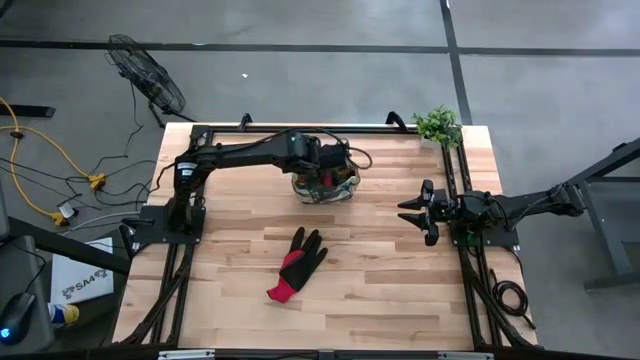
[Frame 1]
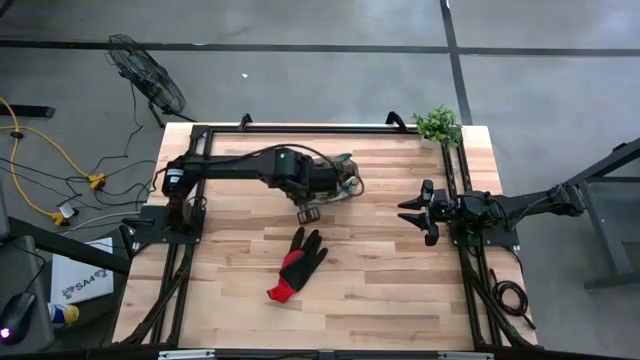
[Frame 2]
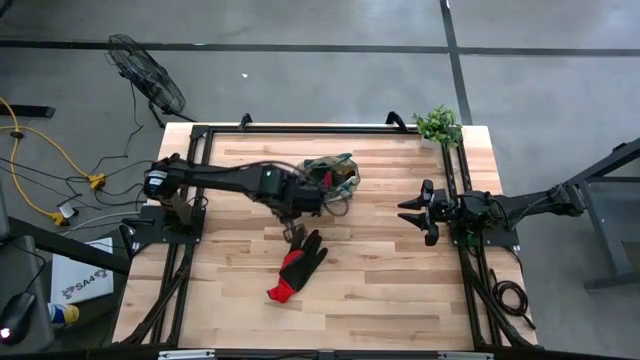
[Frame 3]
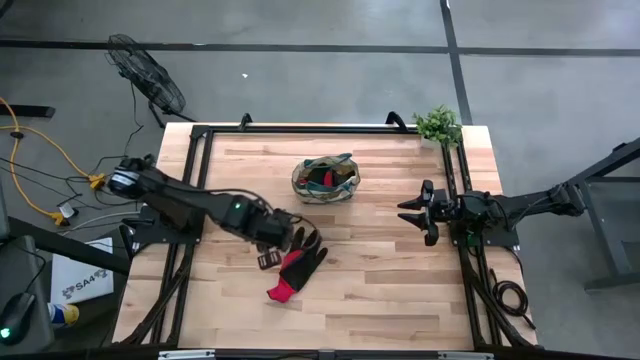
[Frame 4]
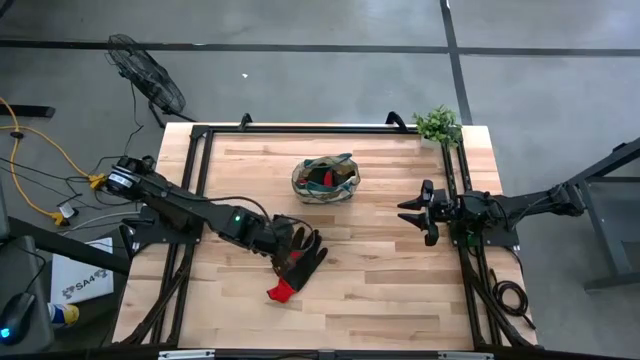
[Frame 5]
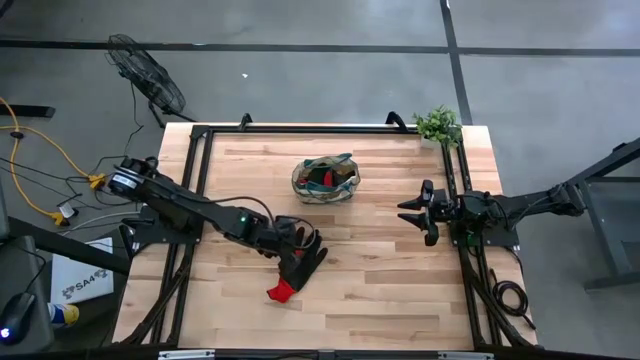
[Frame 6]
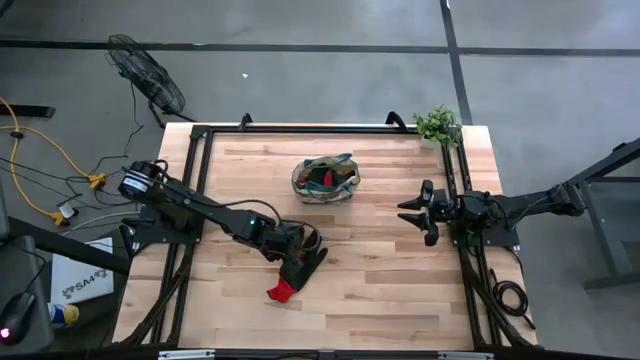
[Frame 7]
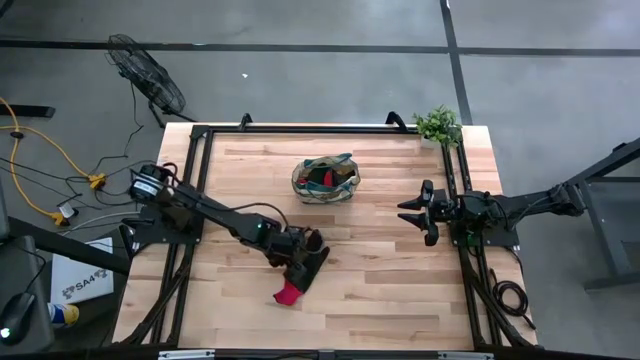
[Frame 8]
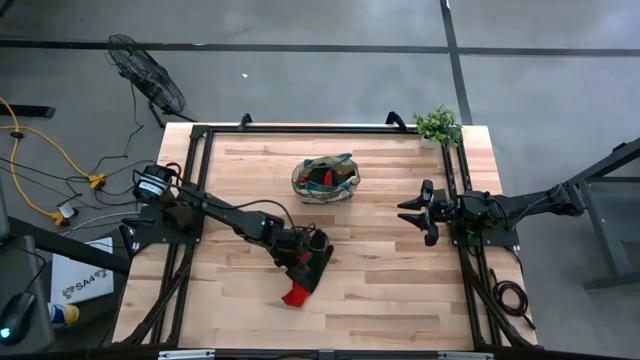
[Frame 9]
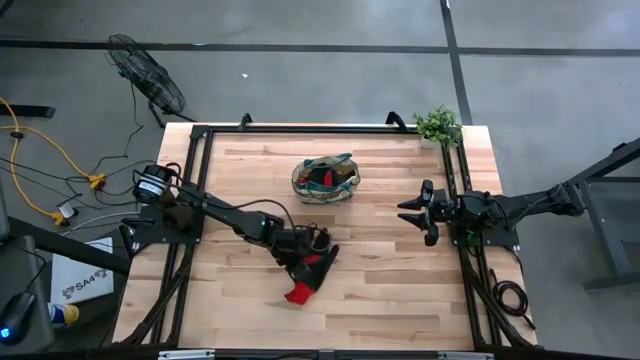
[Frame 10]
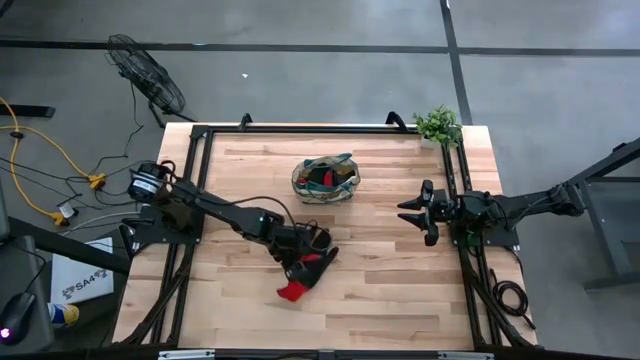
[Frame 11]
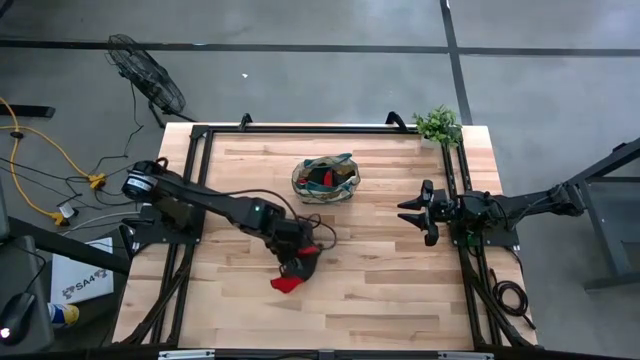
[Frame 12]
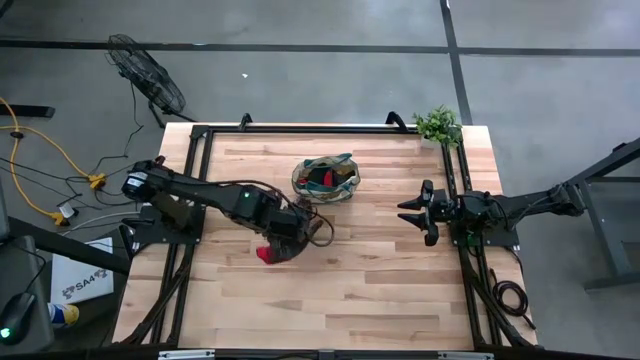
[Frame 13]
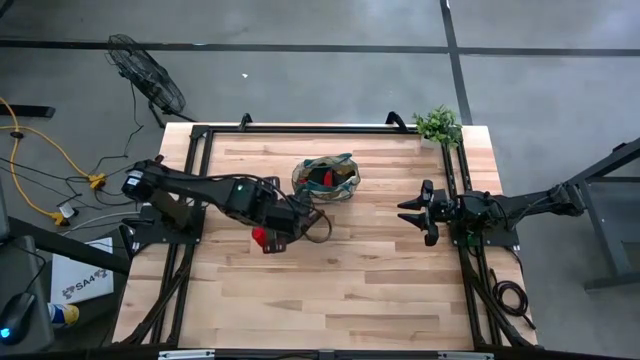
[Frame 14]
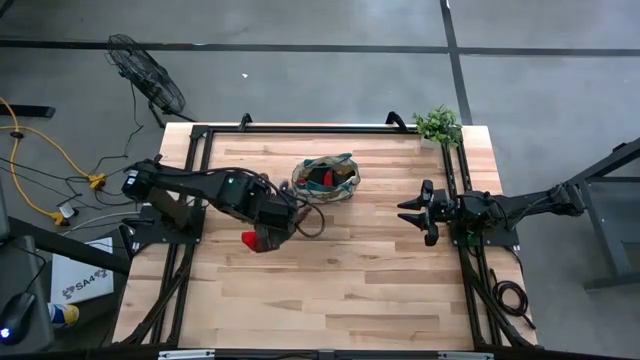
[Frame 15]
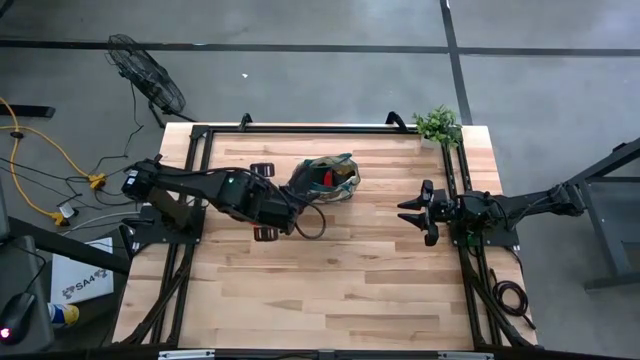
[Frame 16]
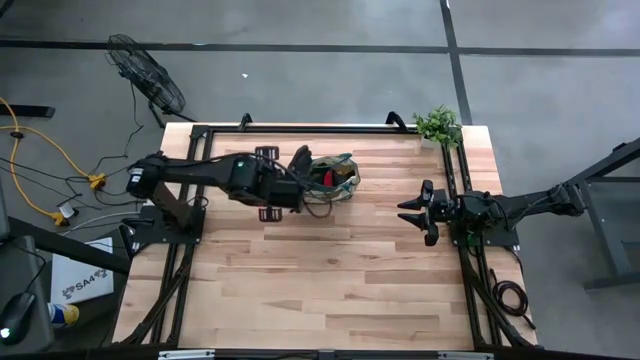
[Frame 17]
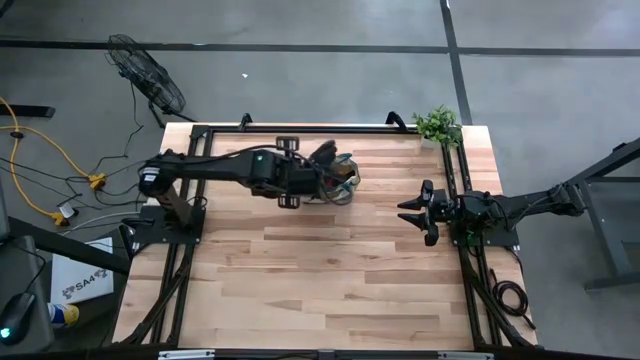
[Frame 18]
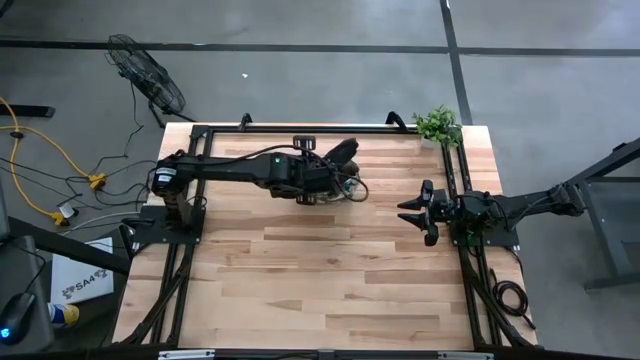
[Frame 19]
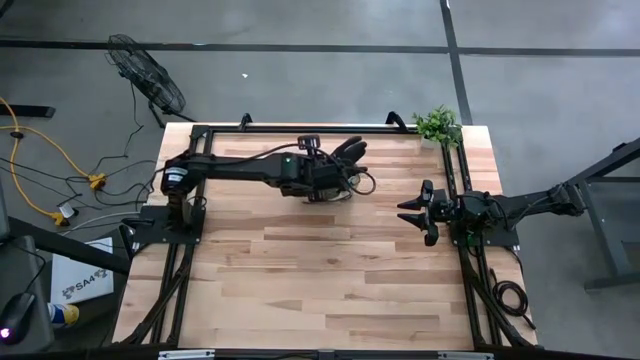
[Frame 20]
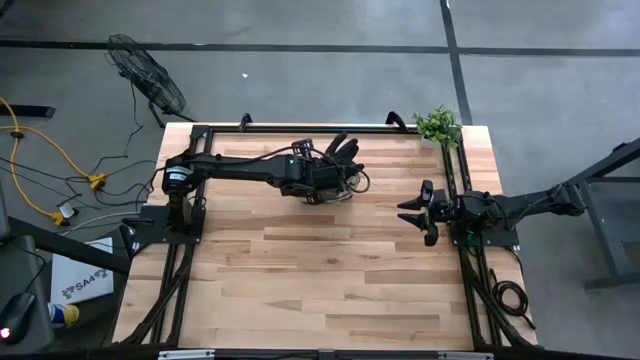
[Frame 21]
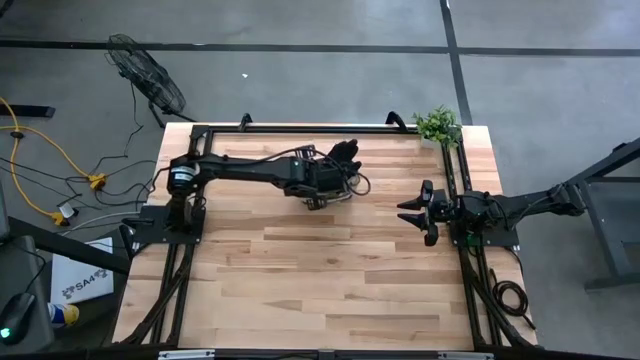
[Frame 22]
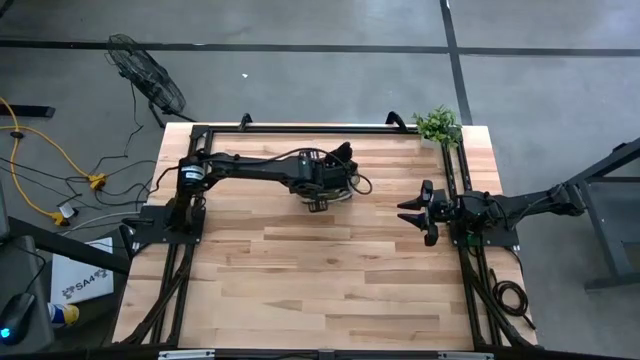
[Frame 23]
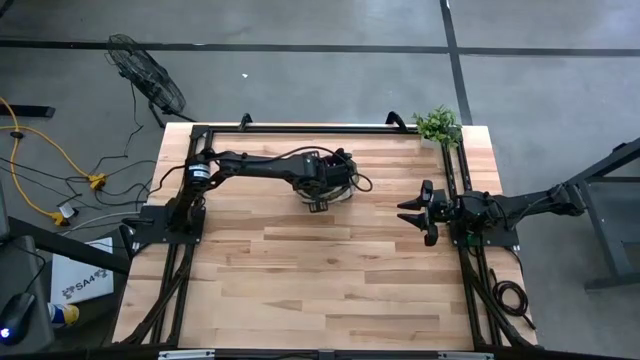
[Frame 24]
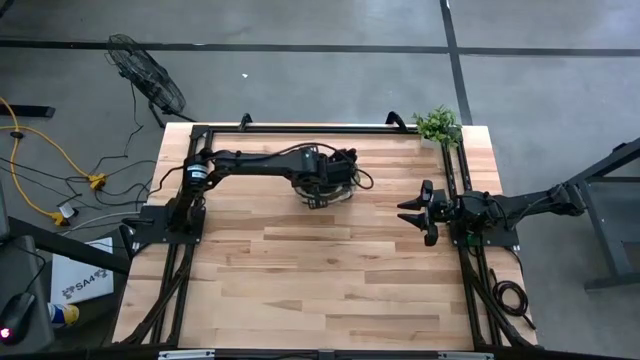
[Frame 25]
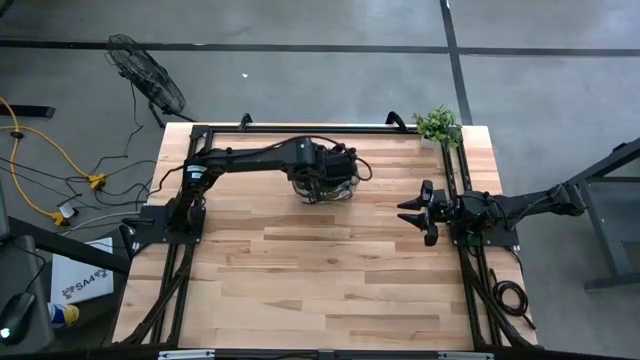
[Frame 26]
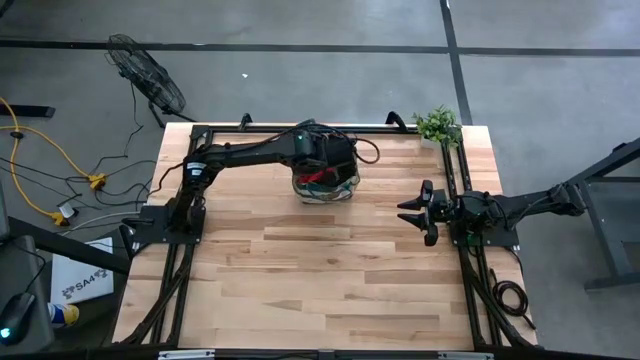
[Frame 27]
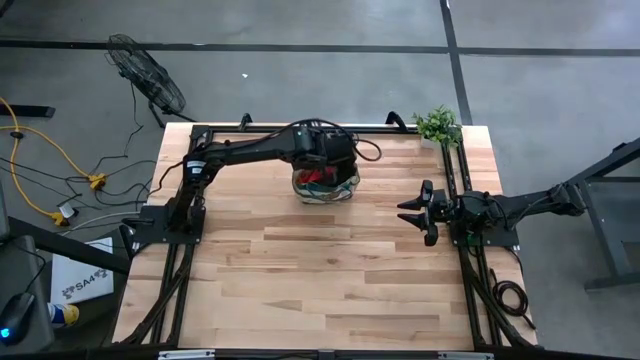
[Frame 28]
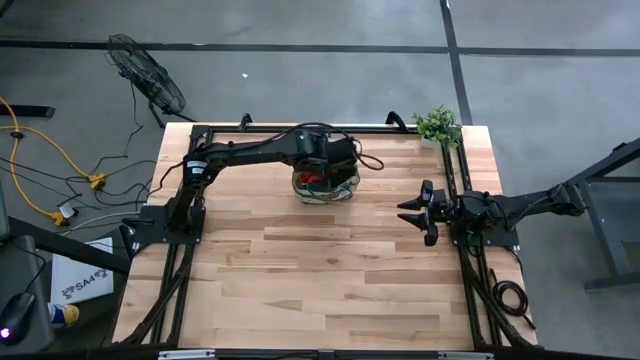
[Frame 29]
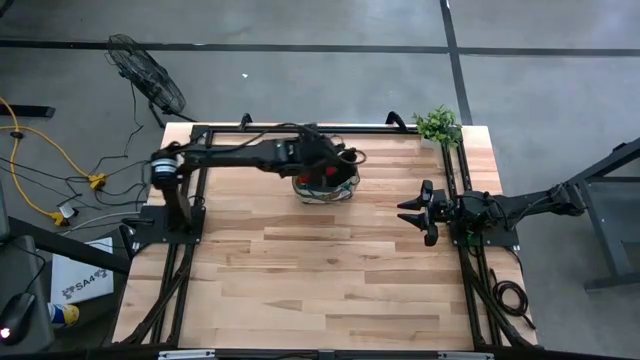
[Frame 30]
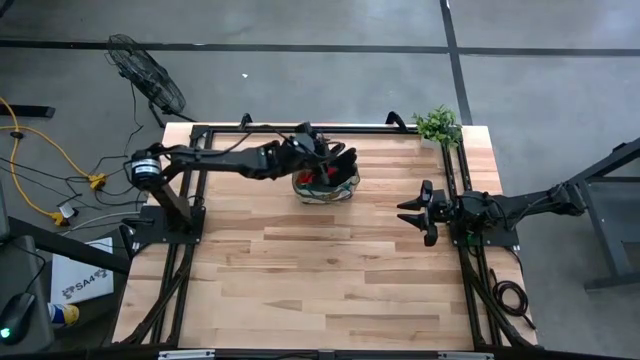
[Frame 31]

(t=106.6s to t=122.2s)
Task: Pick & Place Garden tools in Gardening bag
Put the red glove into the gardening bag

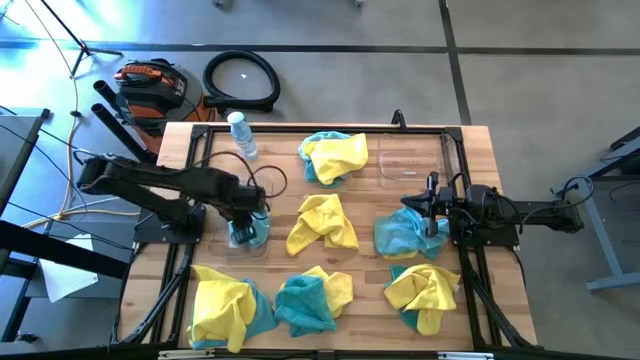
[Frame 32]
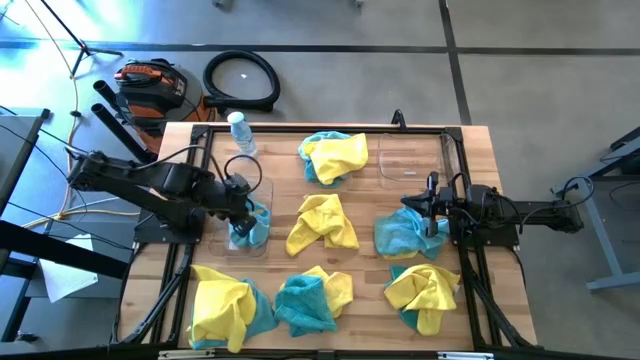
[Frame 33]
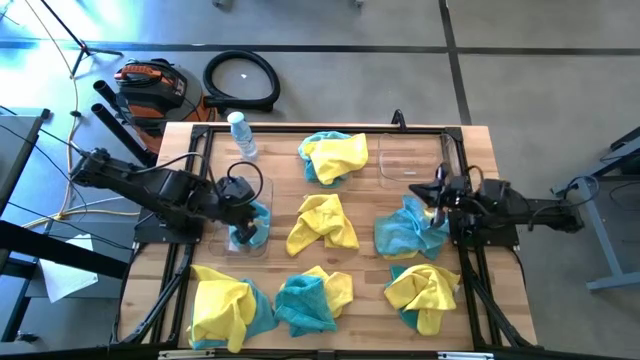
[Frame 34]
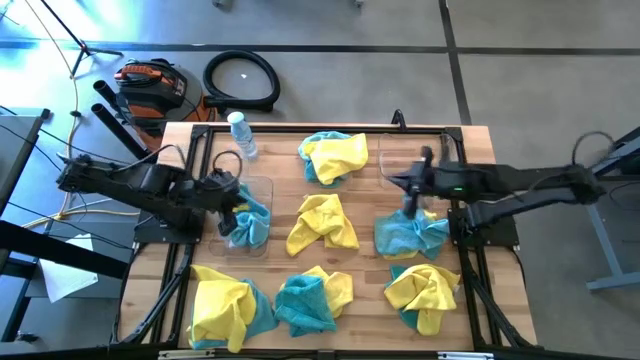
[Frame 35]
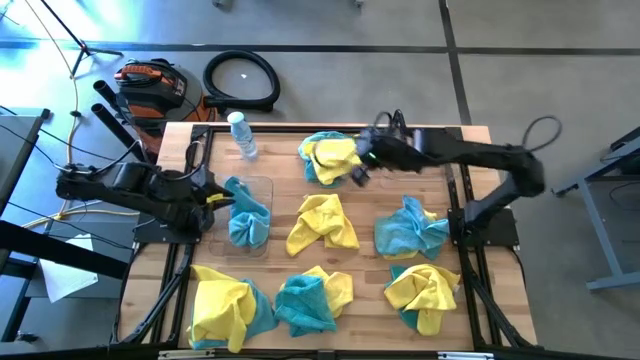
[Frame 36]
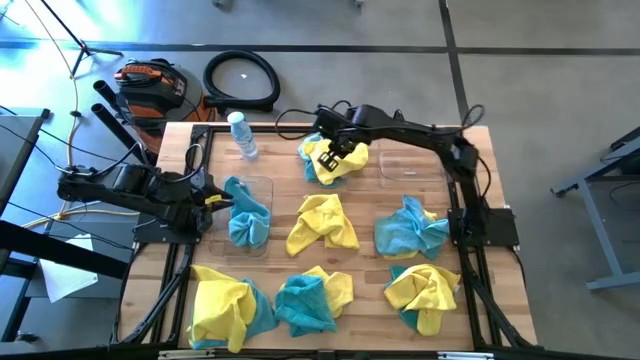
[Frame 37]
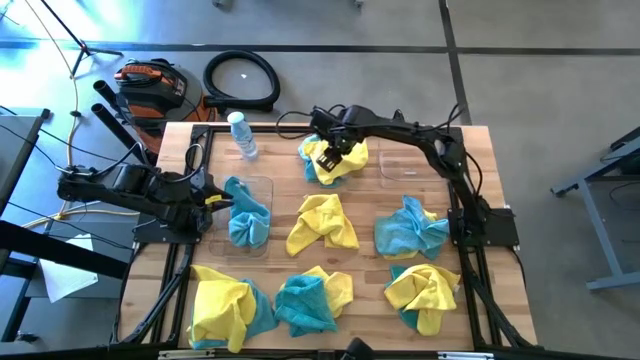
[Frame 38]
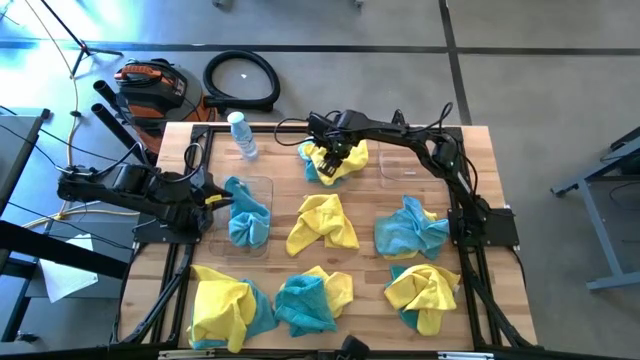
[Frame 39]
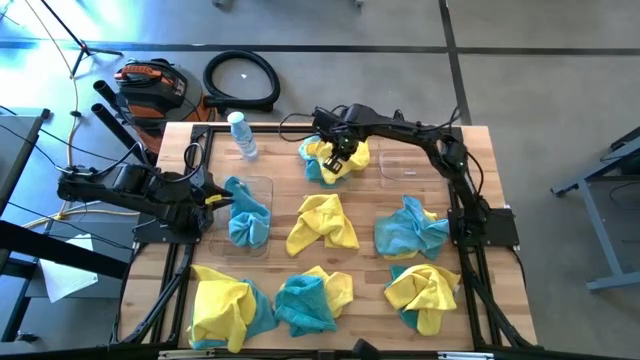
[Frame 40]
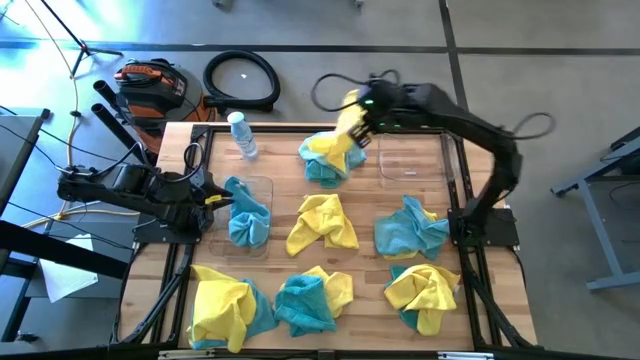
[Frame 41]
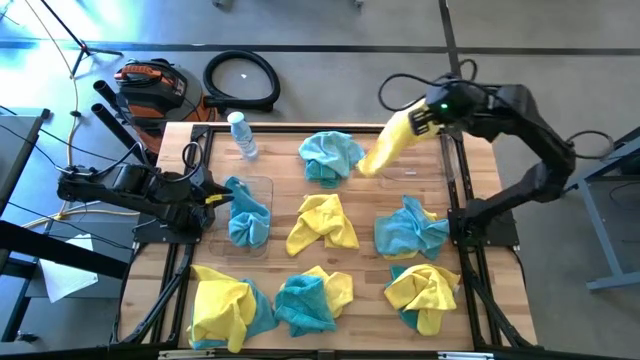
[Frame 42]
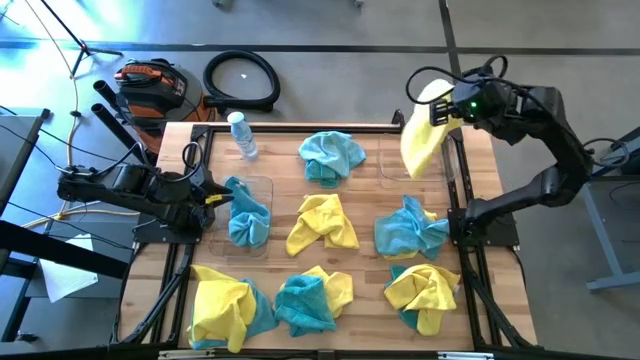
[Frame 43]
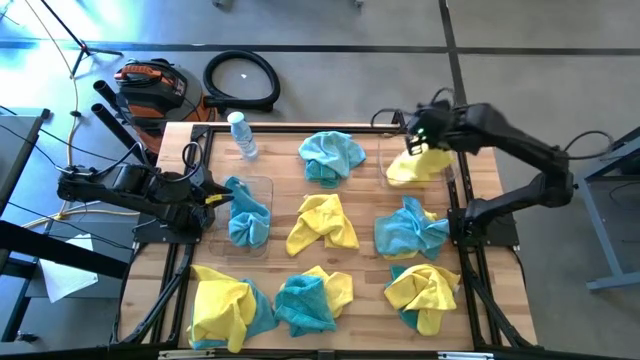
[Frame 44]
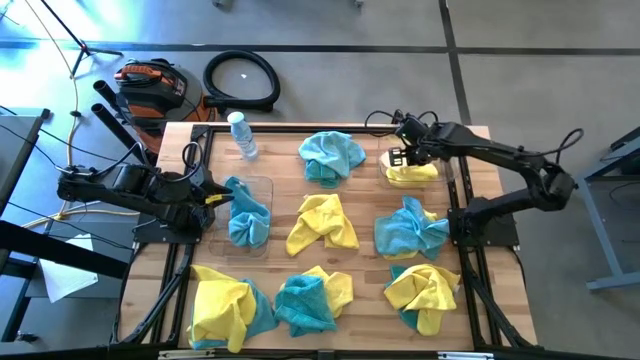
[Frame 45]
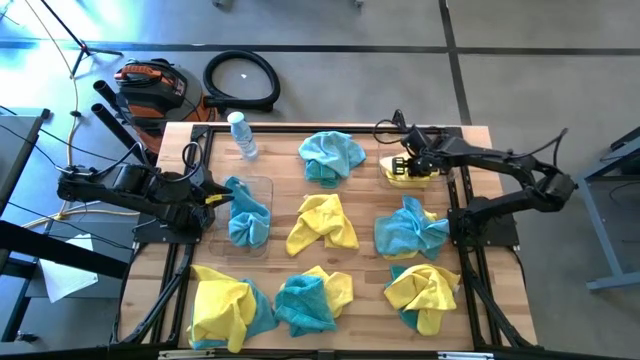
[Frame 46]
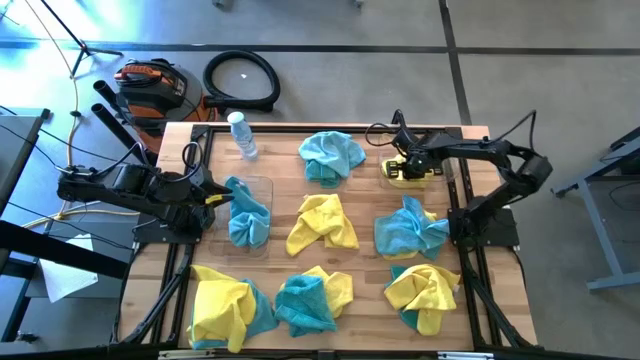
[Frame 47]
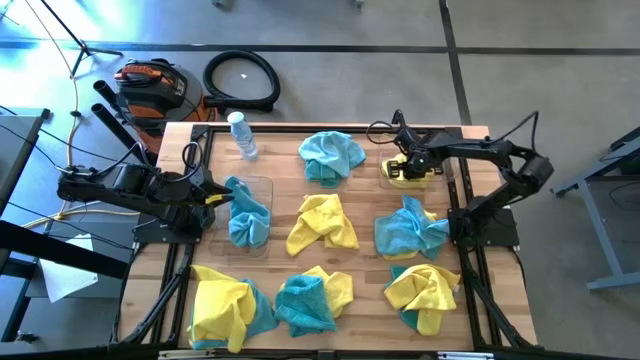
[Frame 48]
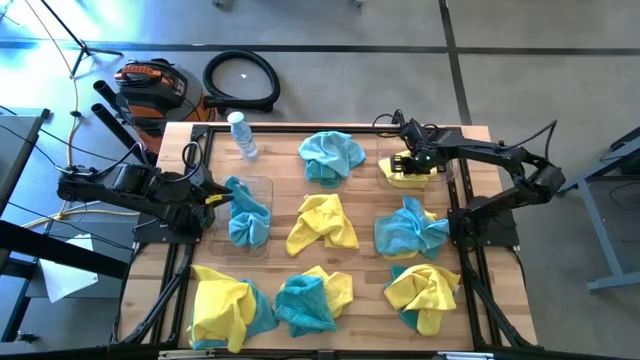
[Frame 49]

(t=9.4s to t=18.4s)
Task: Sort microfiber towel by color & place in baskets
Put the yellow microfiber cloth into the right transparent bin
